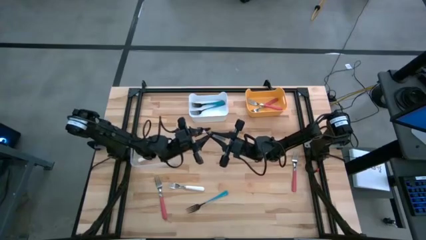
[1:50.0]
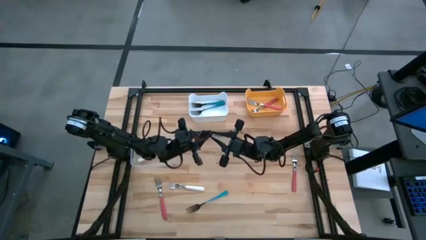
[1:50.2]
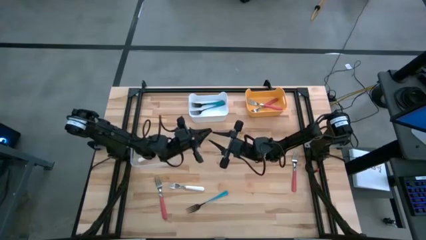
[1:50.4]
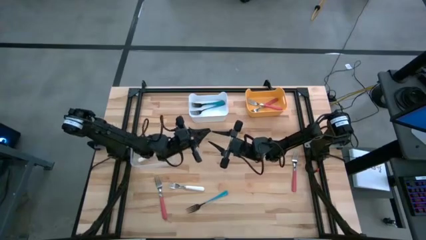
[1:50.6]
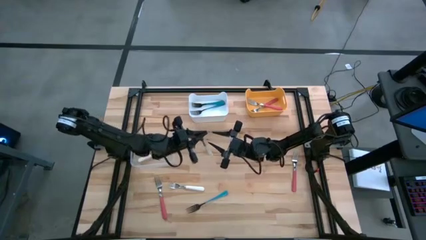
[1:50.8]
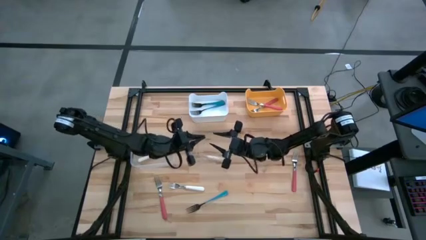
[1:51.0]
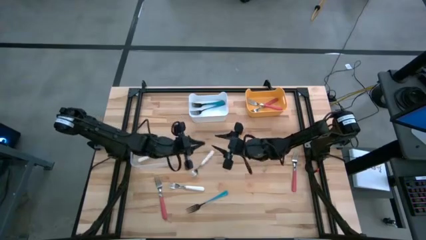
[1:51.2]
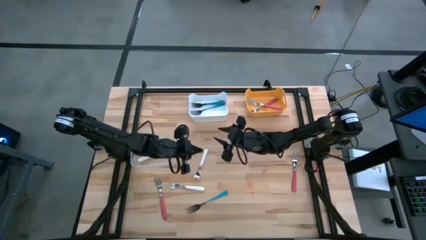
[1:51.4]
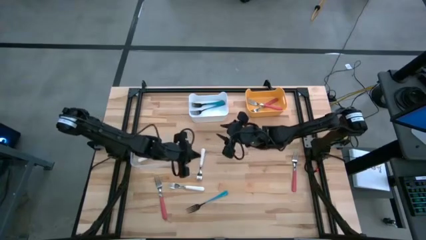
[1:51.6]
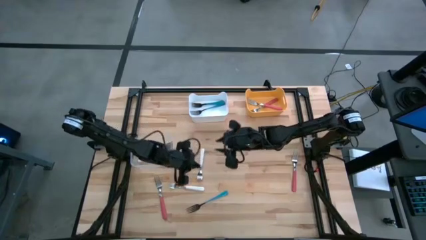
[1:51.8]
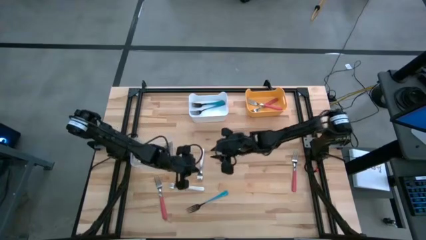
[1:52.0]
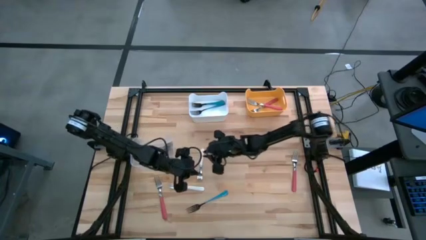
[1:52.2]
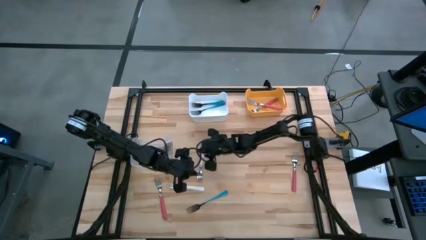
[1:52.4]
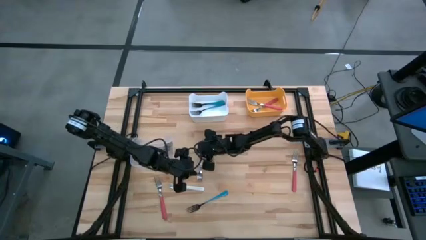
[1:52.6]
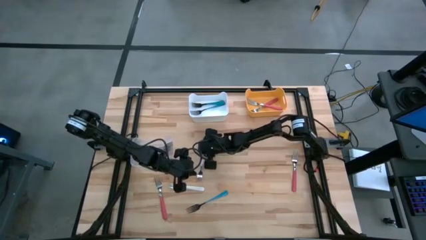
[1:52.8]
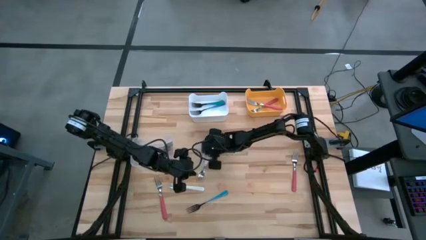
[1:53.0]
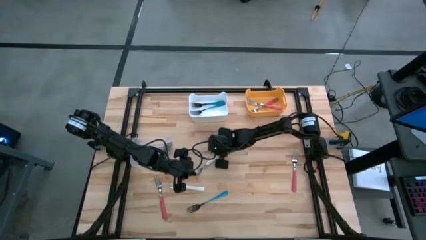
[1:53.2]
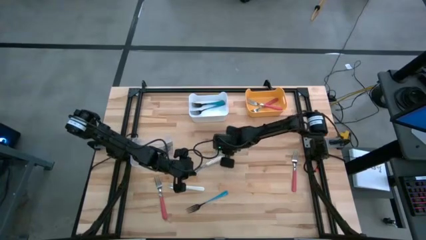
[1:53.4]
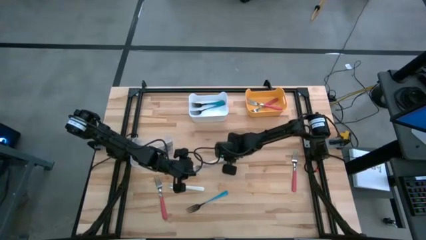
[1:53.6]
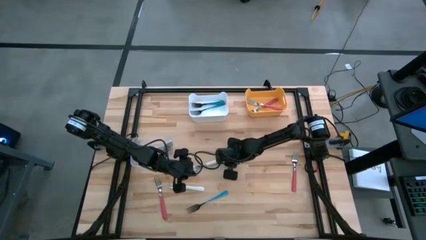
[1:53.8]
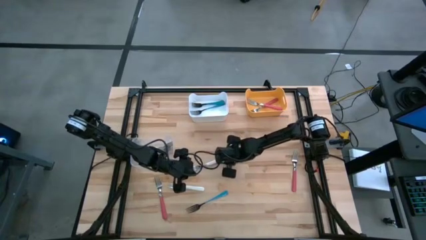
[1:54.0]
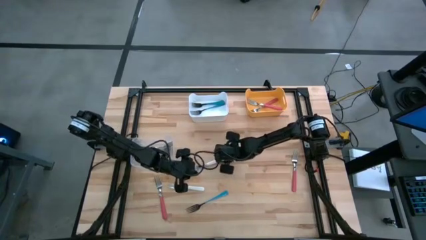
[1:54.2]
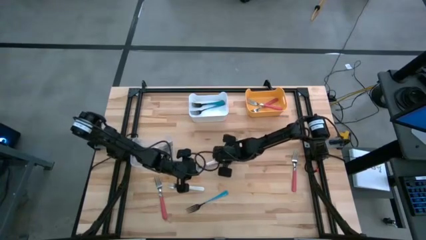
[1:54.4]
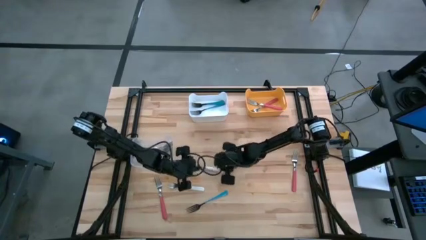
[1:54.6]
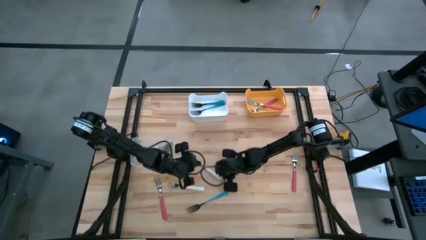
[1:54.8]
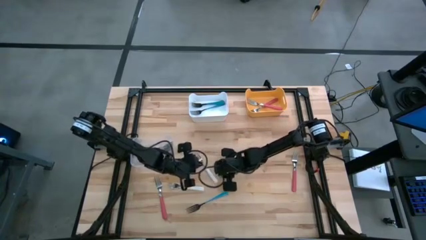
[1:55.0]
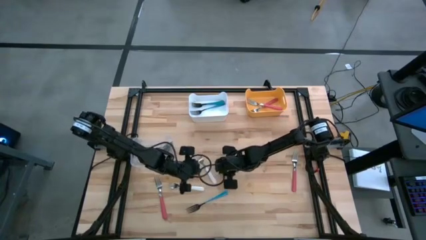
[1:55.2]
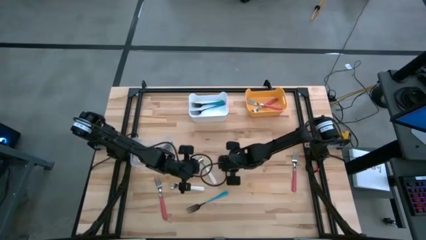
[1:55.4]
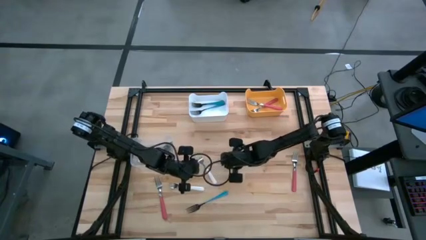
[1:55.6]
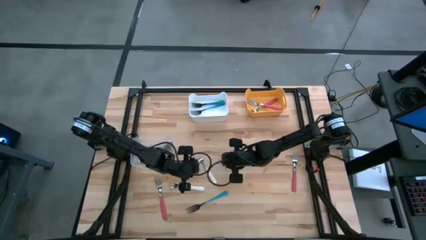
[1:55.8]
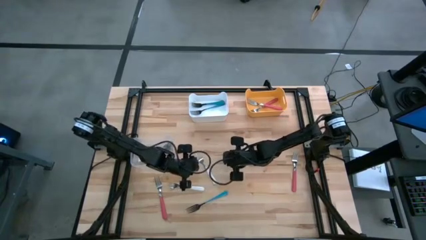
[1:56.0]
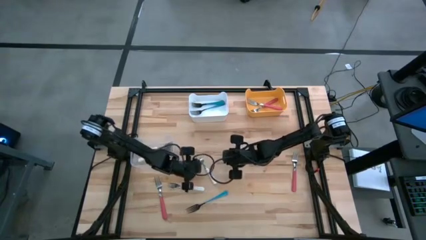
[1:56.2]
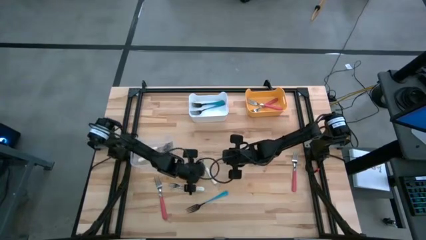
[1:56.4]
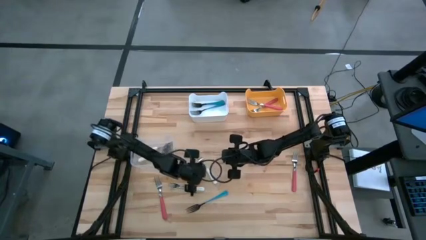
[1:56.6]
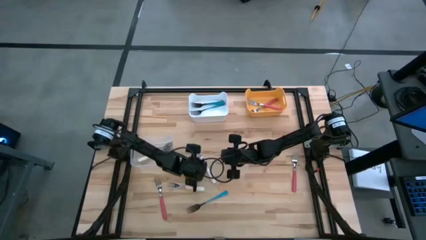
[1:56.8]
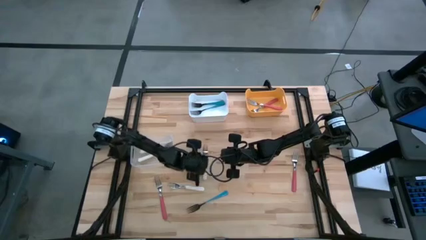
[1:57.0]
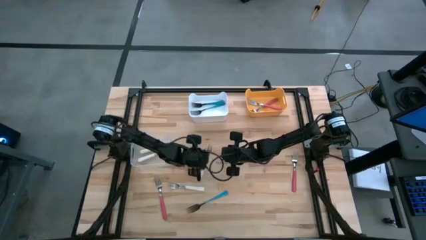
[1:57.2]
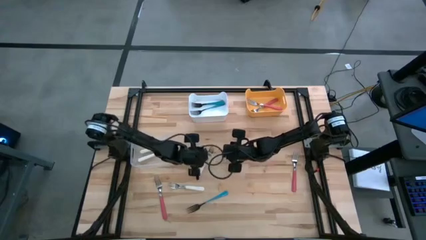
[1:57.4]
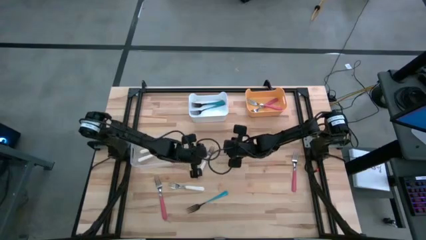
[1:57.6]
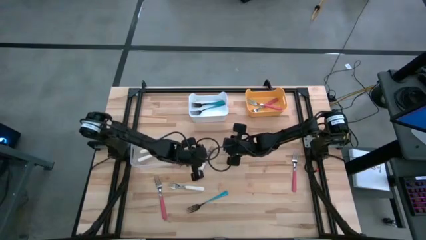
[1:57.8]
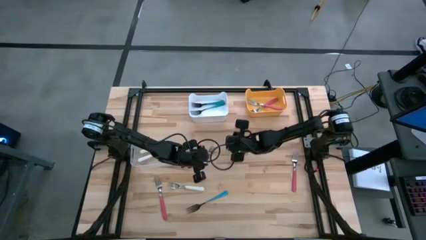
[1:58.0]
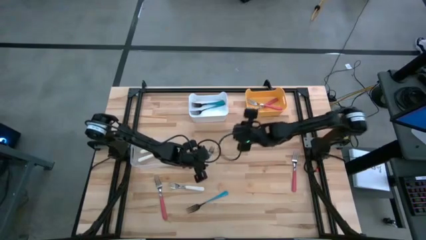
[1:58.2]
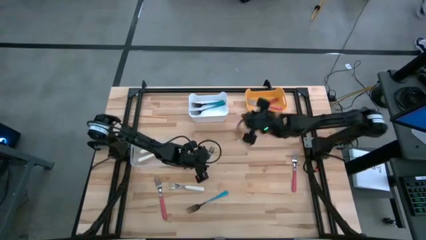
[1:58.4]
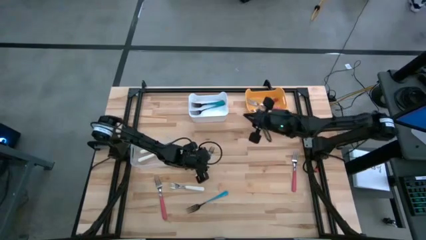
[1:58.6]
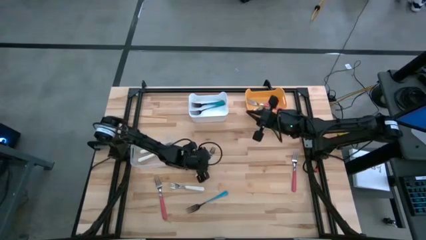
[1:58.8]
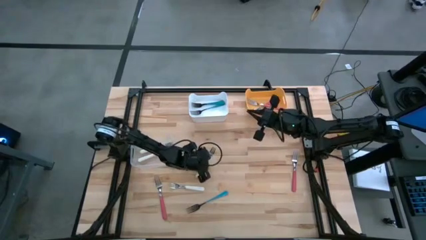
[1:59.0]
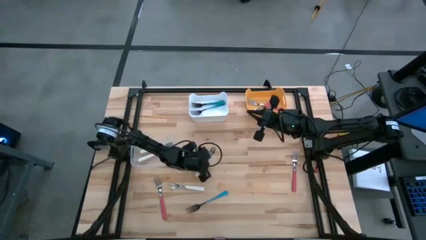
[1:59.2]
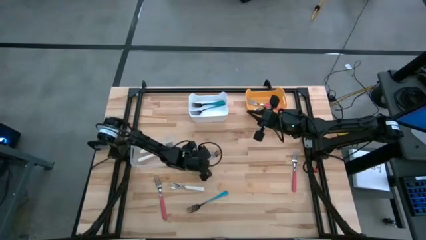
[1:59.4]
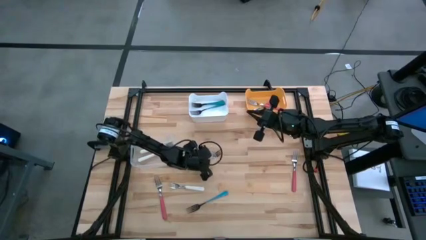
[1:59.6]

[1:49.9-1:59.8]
Task: Sort silverware by color (type)
Put the top white fork into the transparent bin

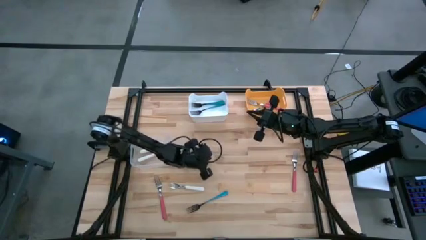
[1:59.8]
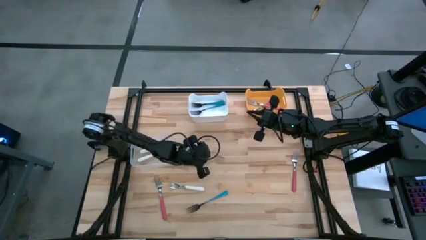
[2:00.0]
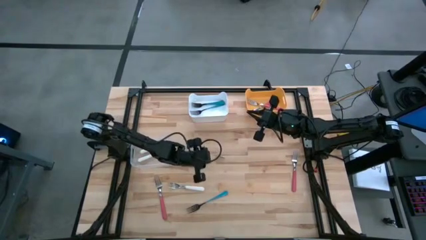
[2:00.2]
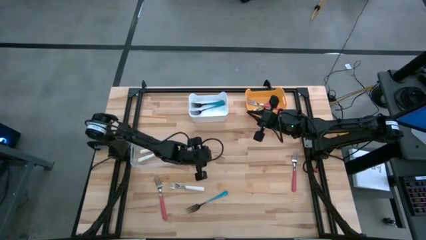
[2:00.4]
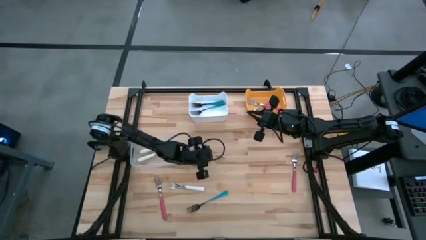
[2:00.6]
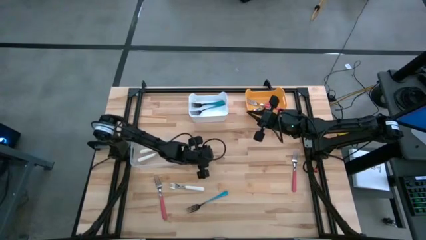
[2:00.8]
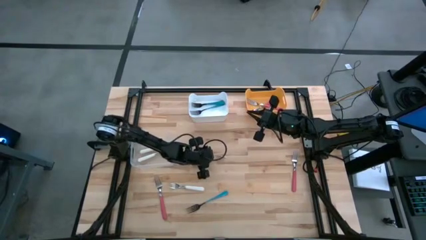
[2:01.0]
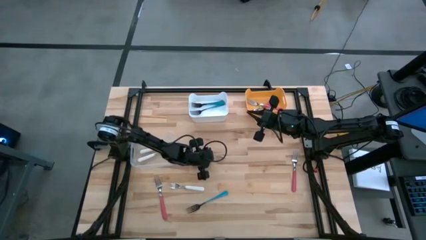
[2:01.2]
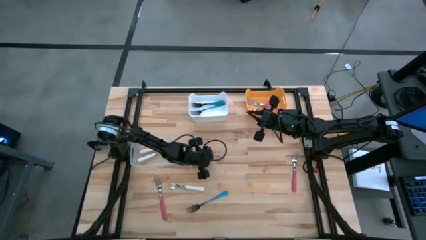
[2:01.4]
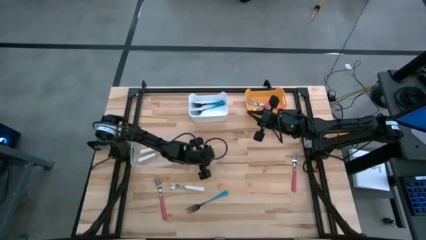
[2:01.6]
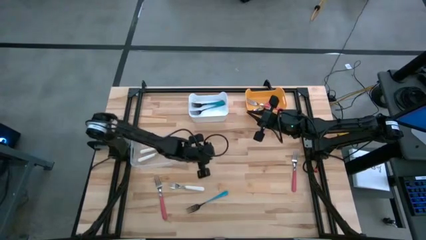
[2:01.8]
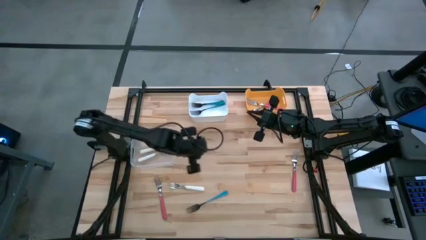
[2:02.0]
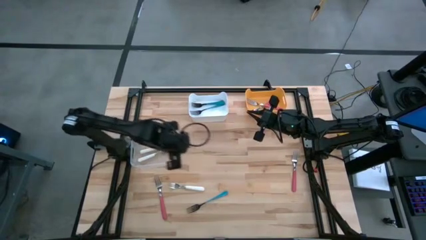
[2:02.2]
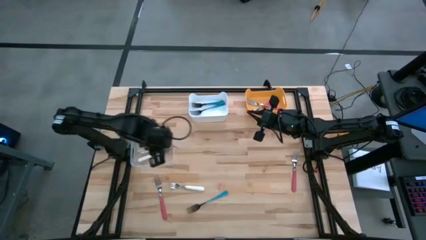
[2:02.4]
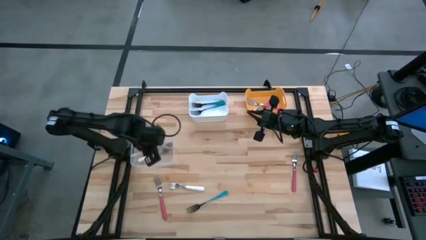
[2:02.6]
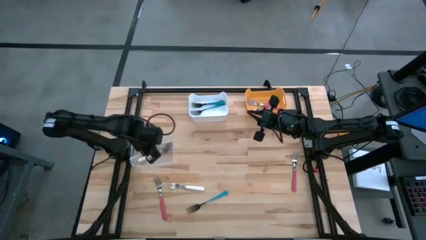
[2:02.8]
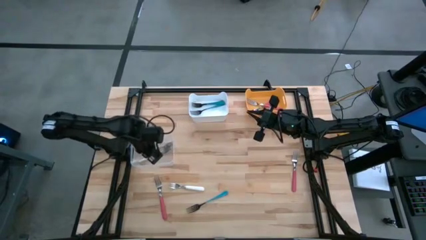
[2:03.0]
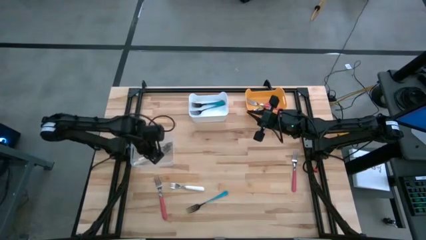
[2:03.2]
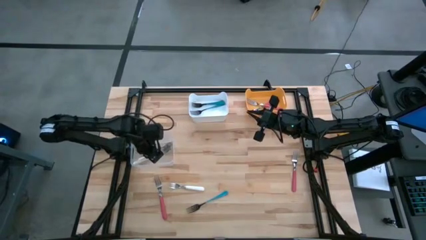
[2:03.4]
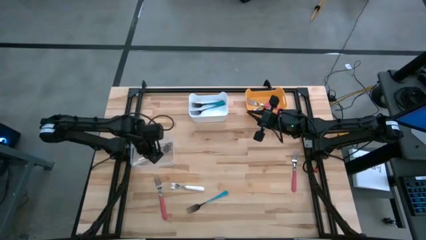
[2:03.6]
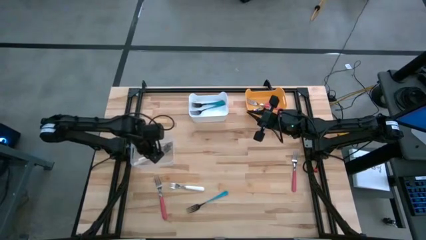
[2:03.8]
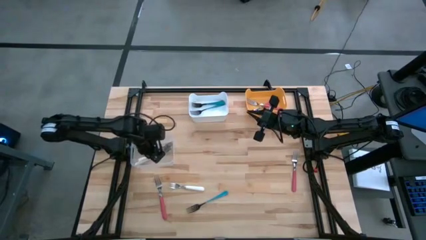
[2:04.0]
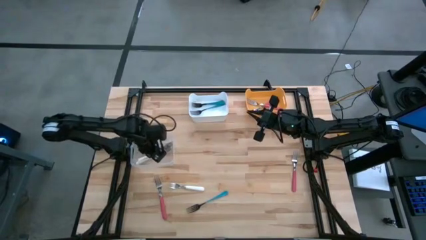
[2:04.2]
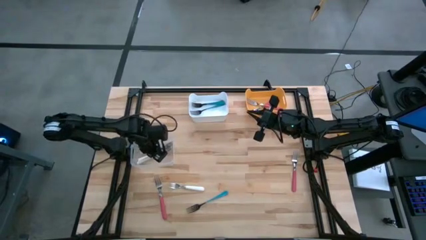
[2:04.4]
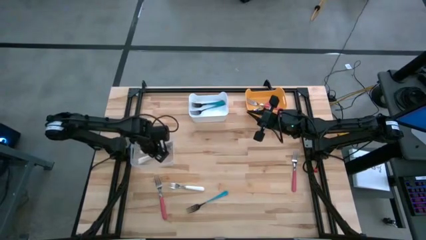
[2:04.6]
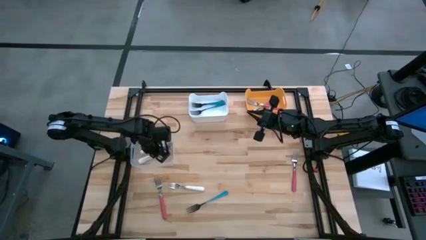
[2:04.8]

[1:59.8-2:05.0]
Put the top white fork into the transparent bin

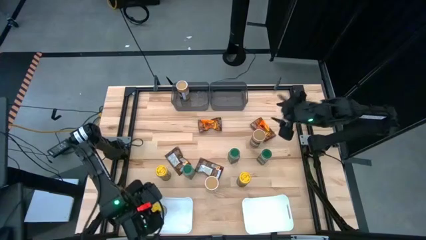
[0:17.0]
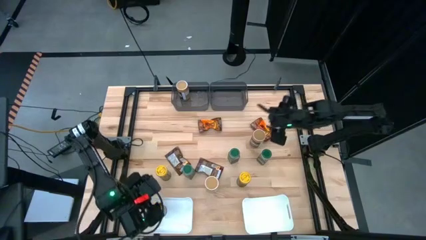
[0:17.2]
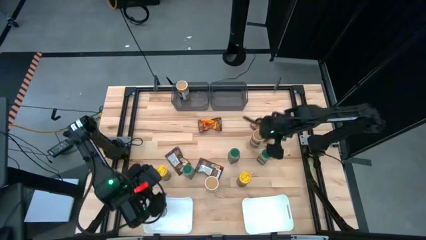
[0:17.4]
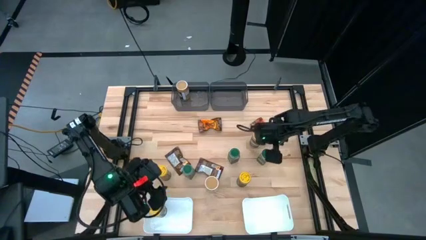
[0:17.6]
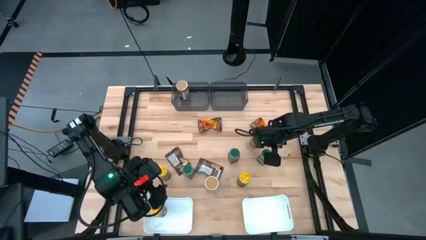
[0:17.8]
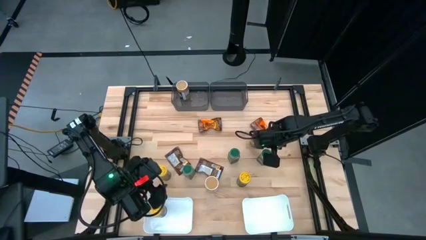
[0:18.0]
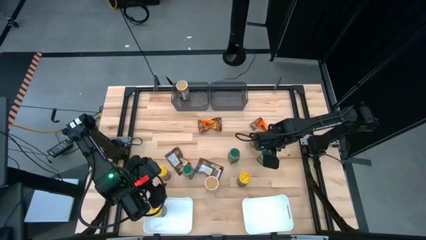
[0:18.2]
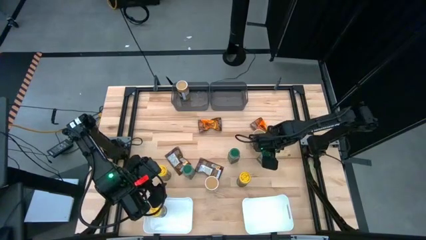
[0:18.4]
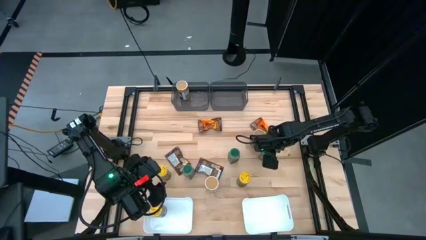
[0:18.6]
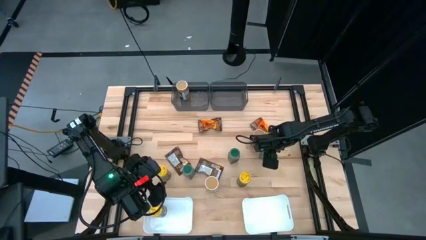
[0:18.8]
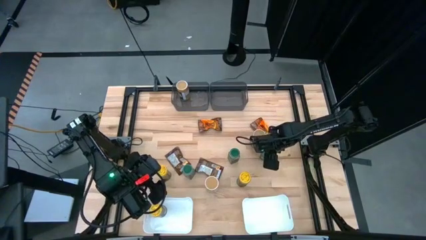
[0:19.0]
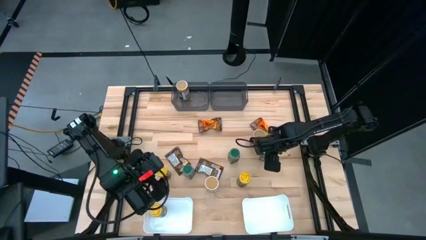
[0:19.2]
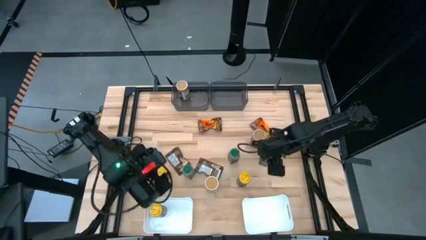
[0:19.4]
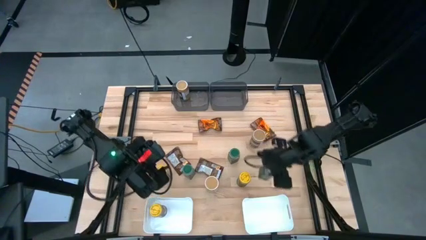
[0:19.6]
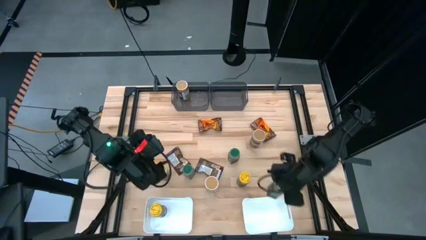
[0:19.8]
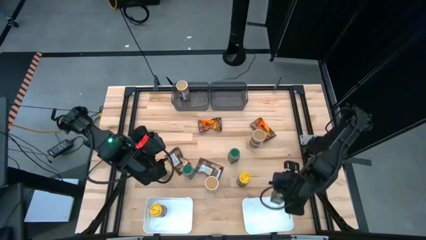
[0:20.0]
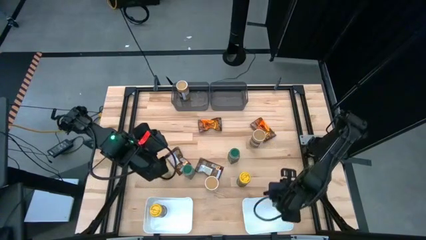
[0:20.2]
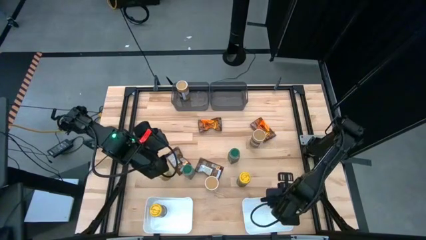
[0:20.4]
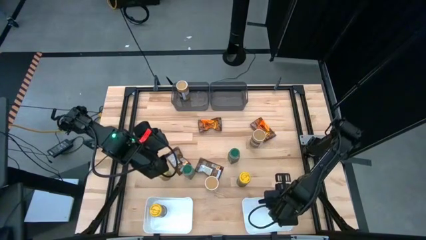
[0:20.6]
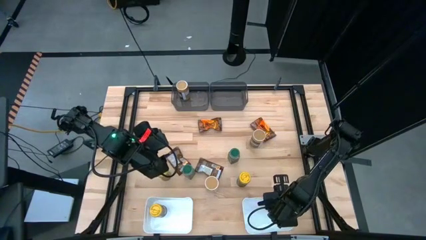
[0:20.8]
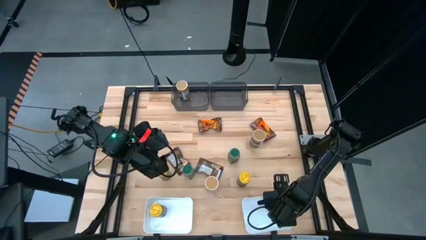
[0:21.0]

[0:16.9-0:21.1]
Task: Sort spices by type
Put the top right green seasoning bottle into the bottom right white bin
